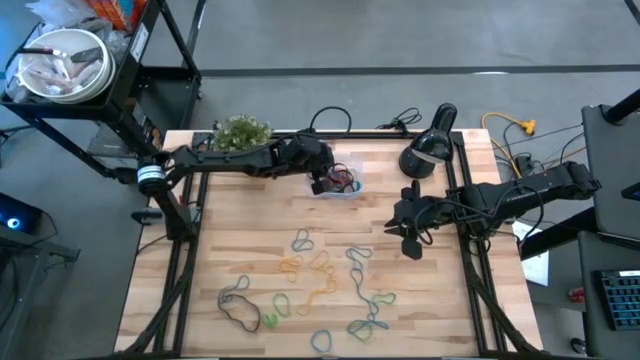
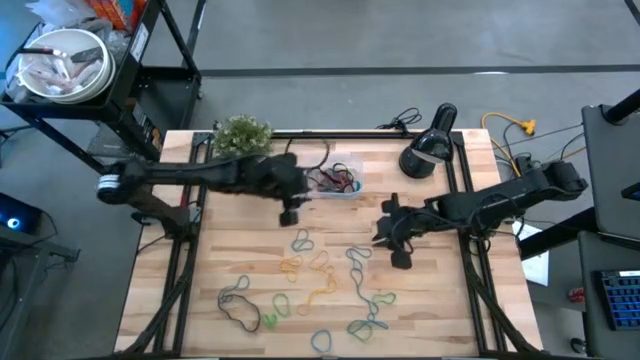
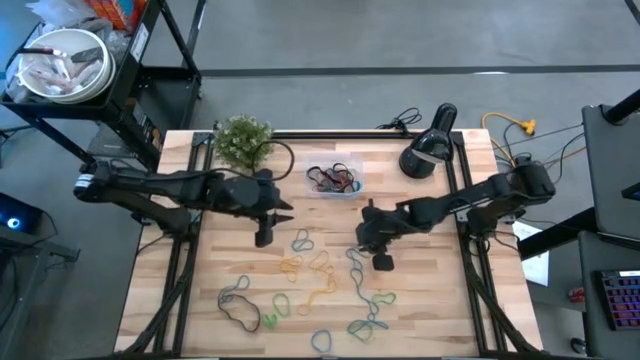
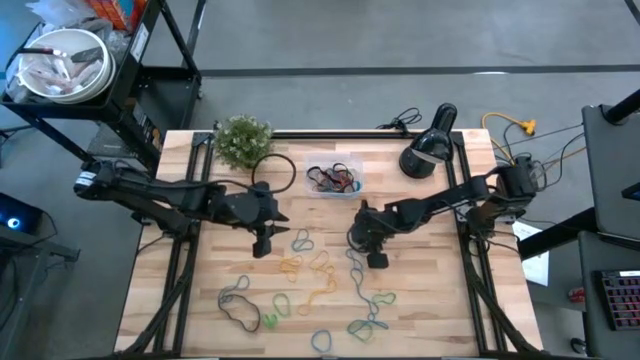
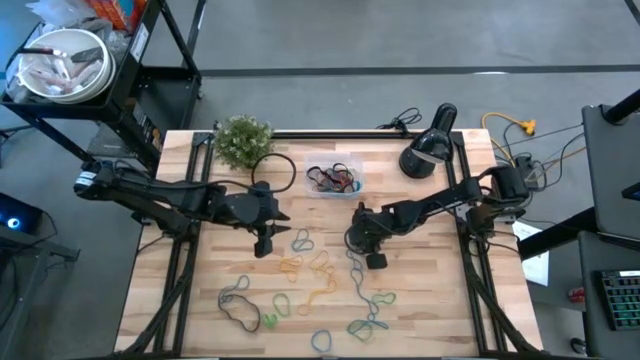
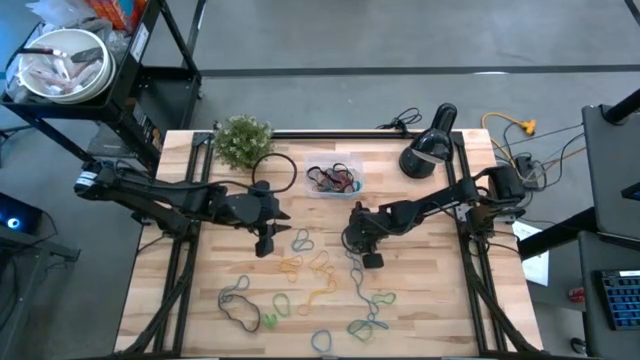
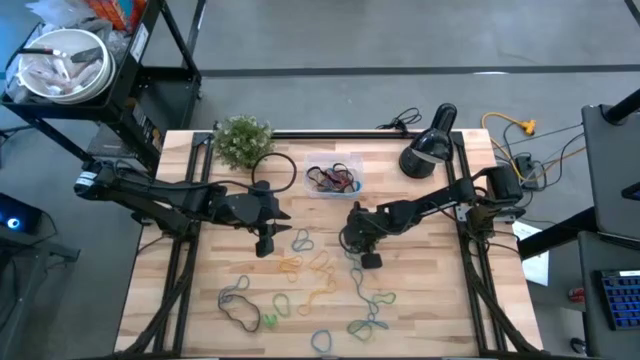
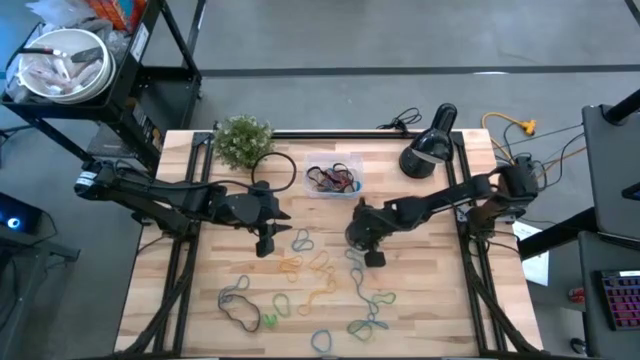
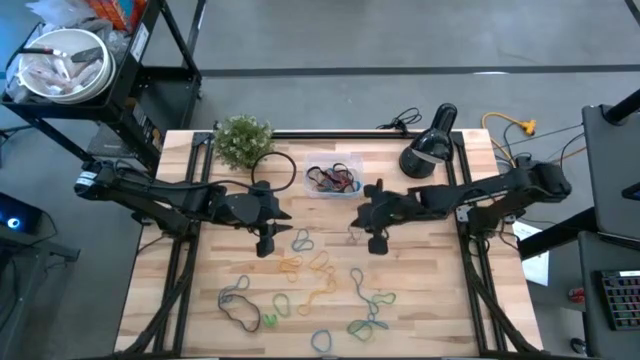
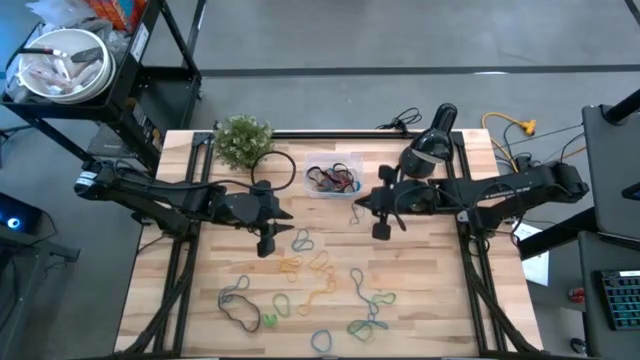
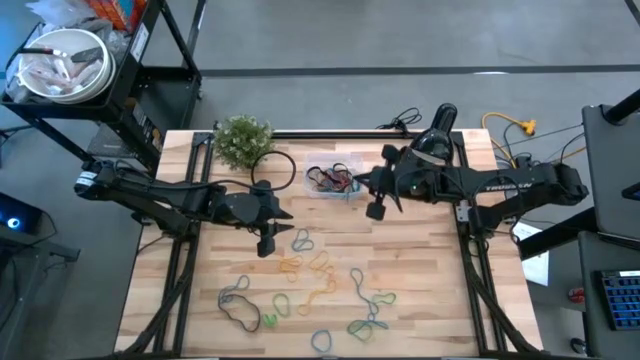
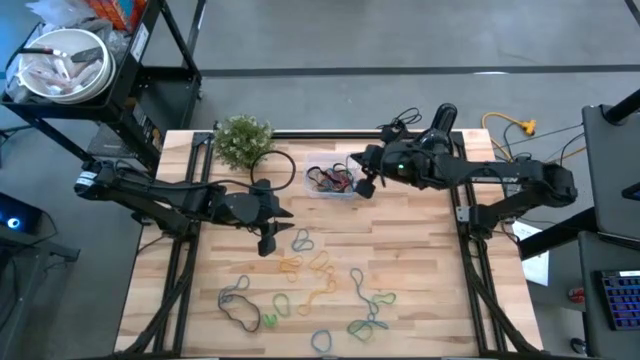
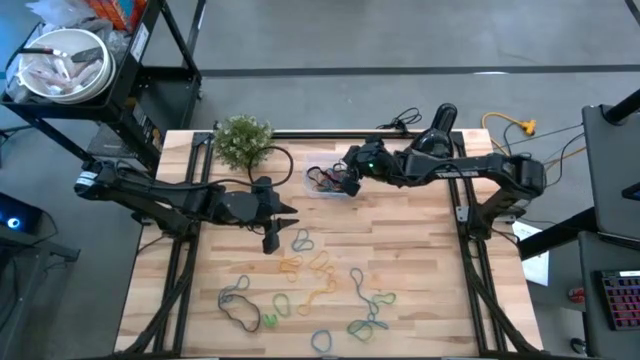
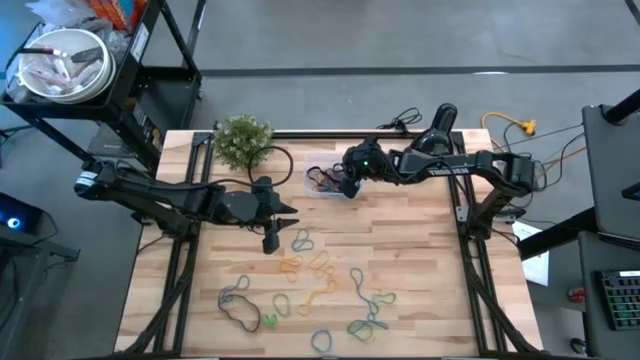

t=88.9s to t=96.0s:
Task: Pick and place rubber bands into bin
Put the blue rubberband into the transparent bin

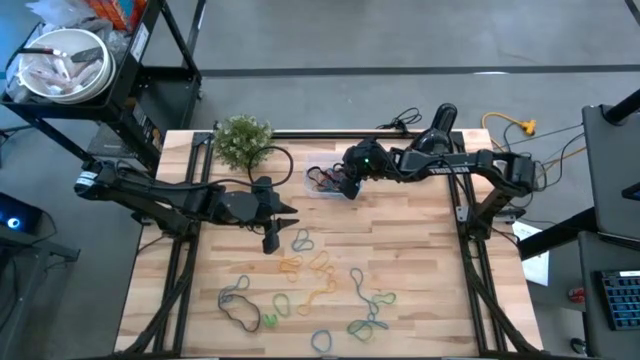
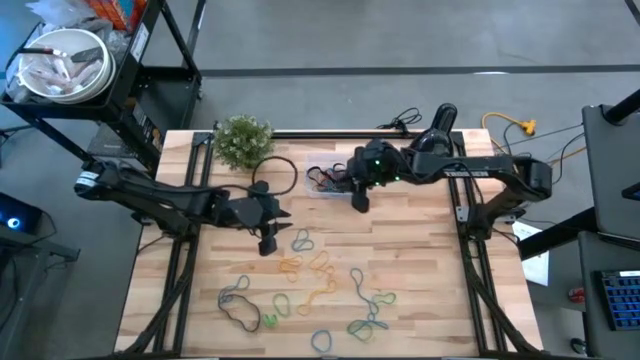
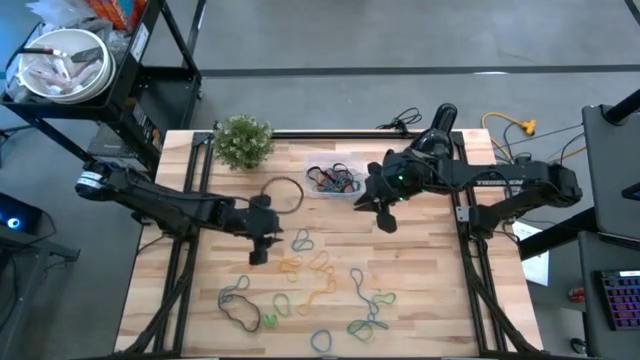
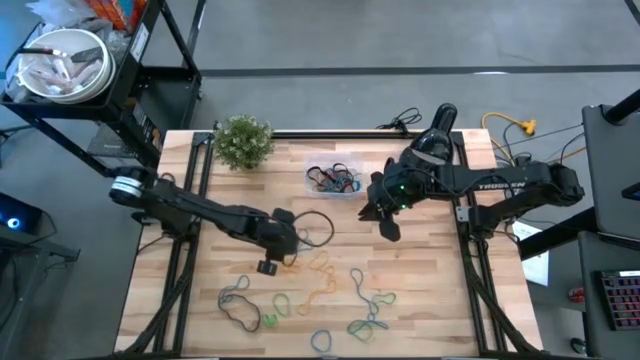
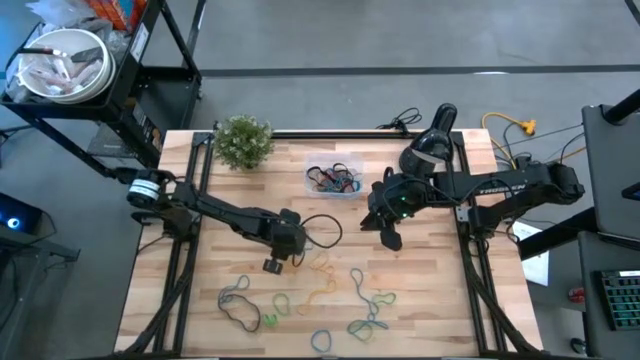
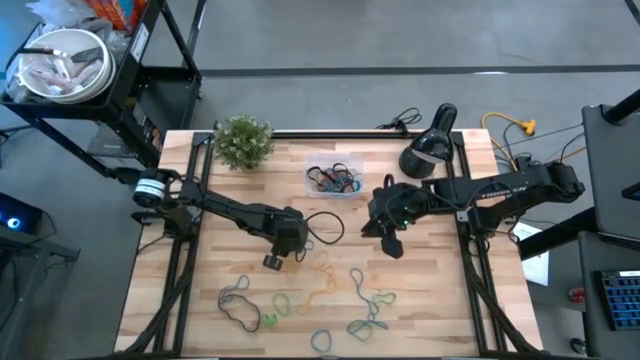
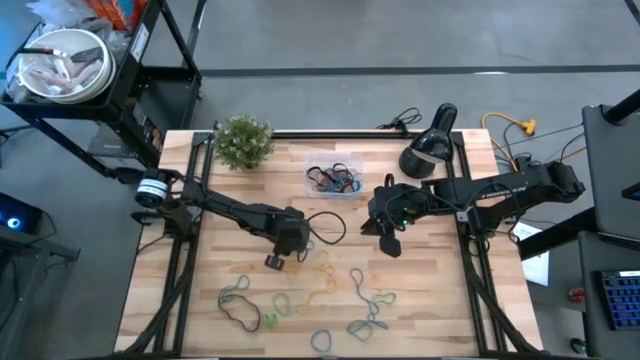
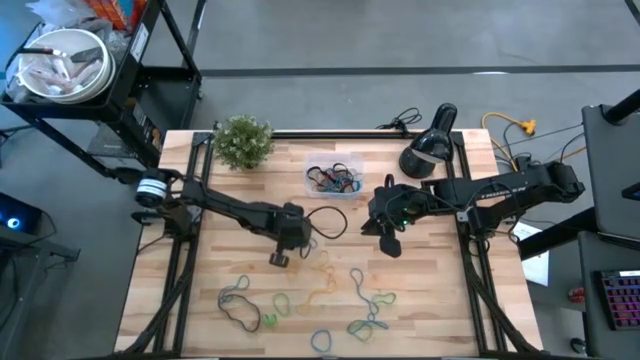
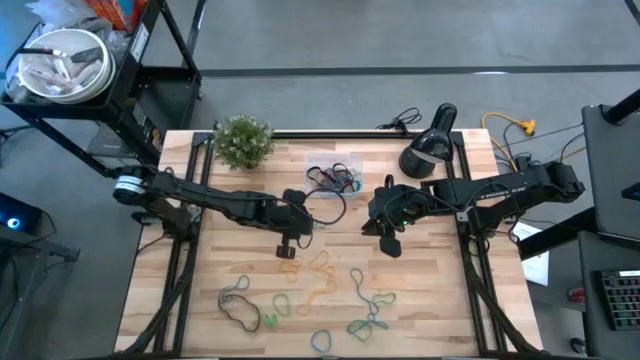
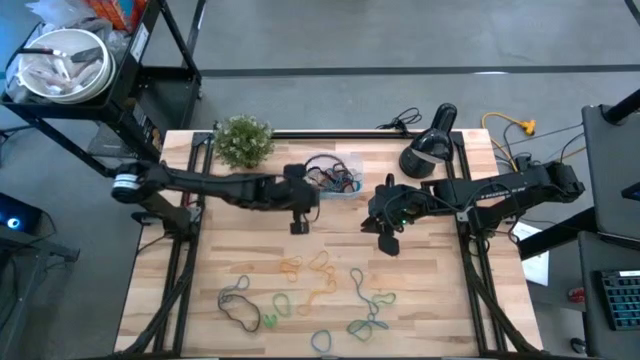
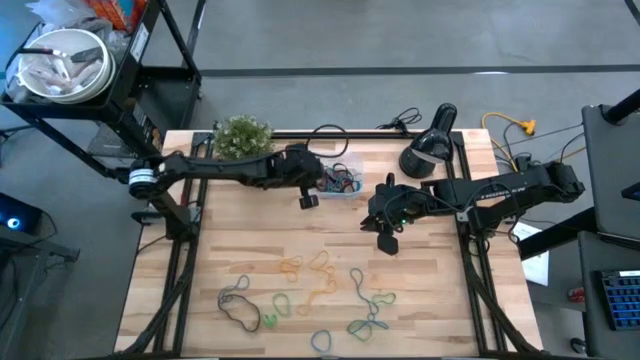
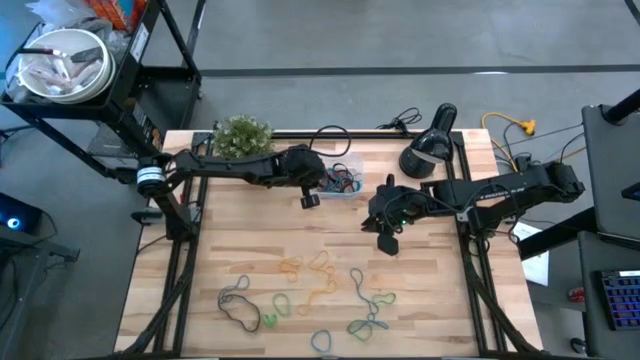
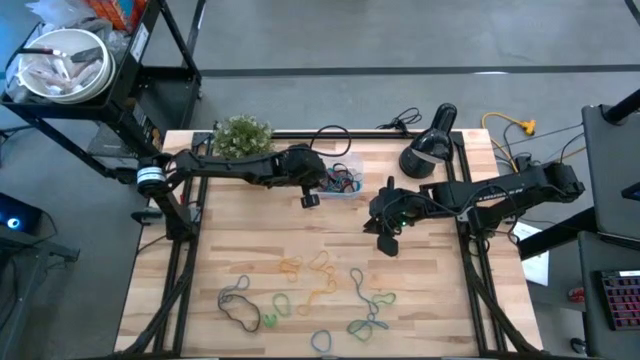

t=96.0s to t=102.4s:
Put the blue rubberband into the transparent bin

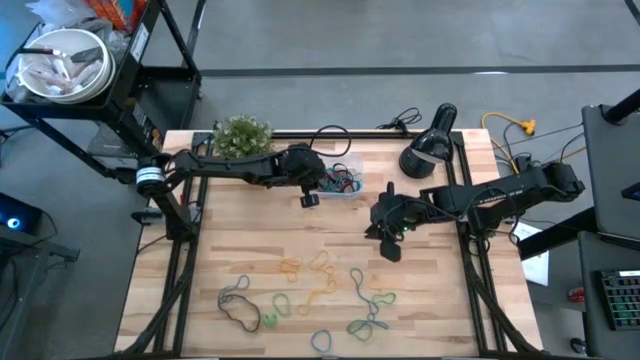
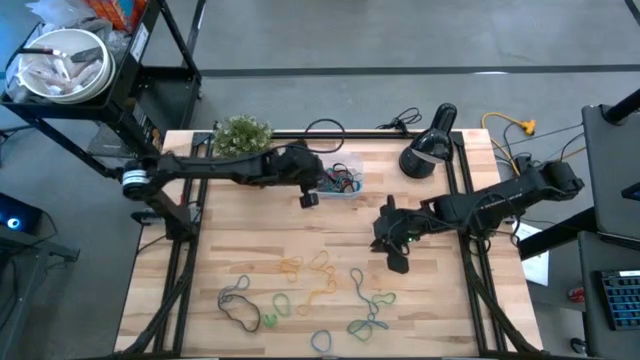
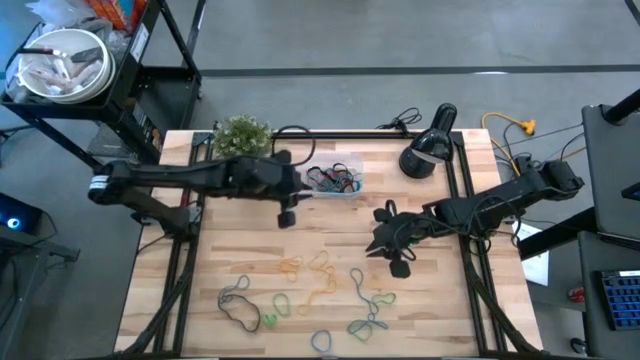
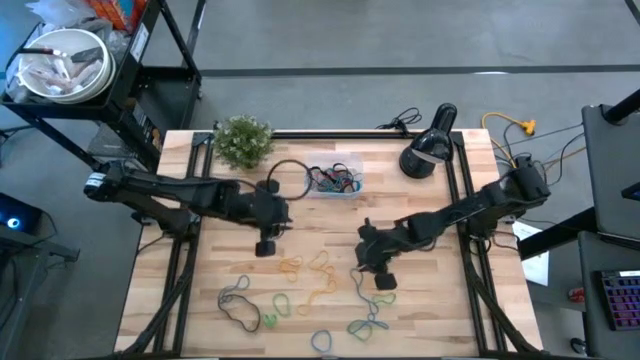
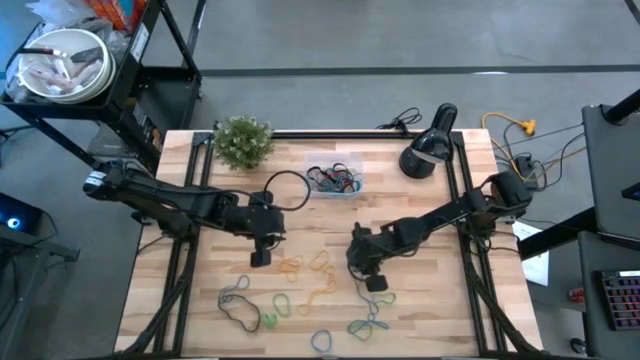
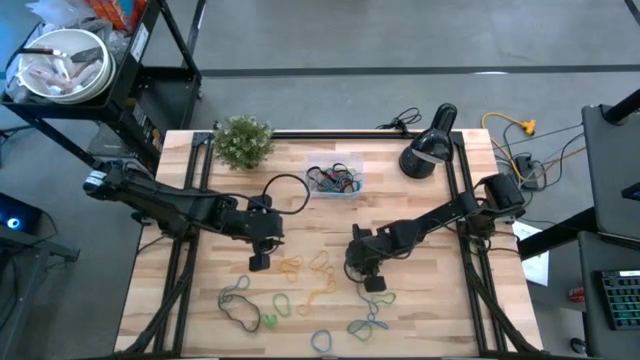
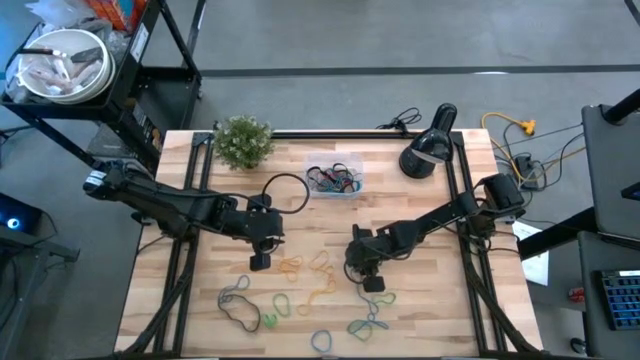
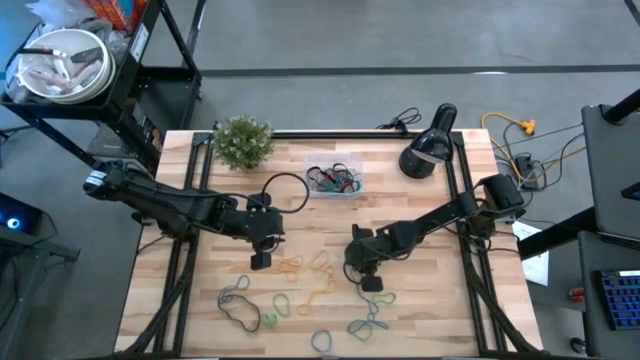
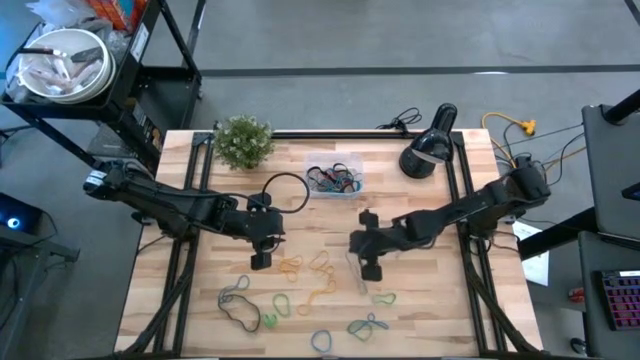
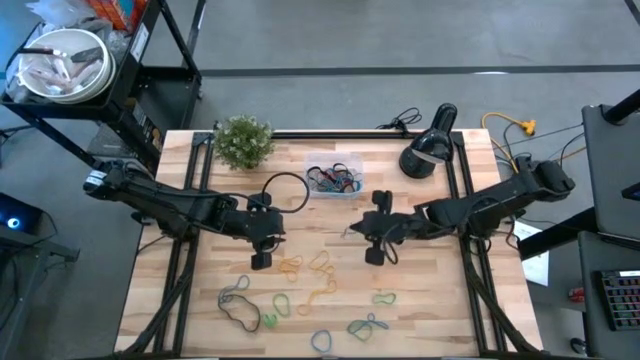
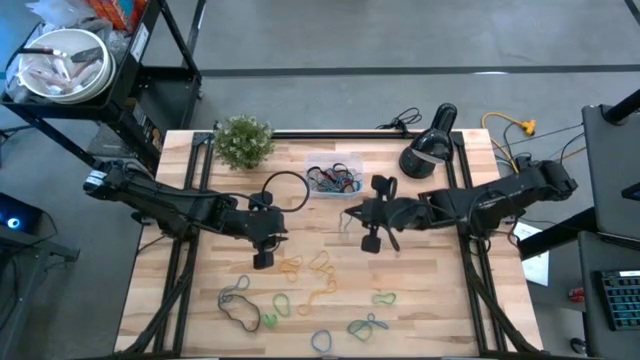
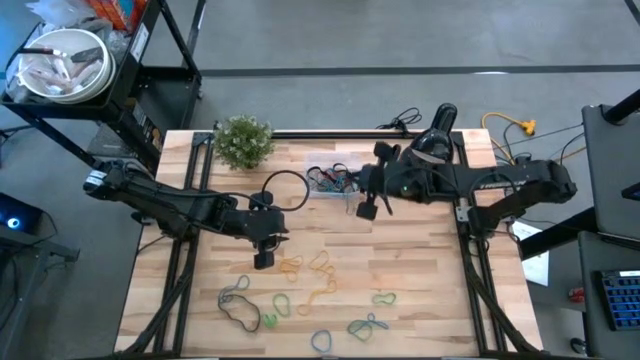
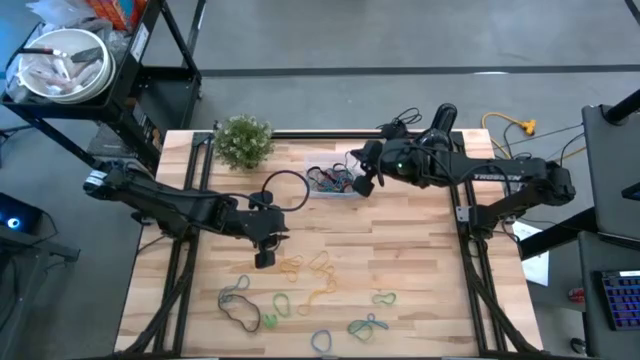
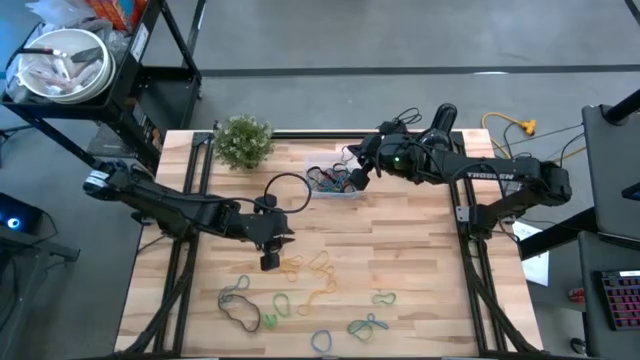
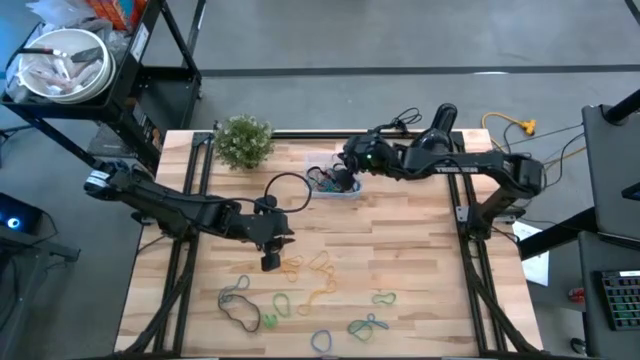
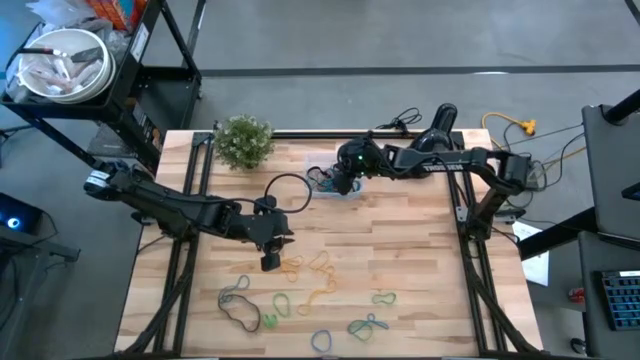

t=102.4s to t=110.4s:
Put the blue rubberband into the transparent bin

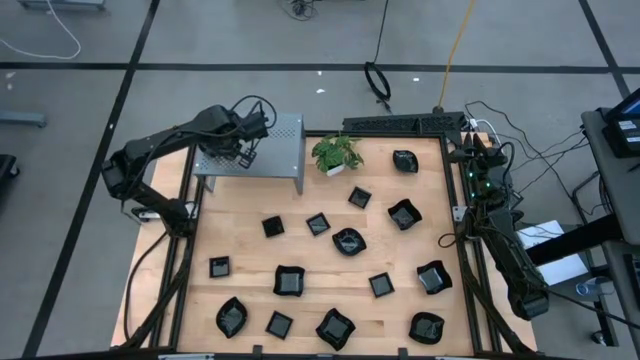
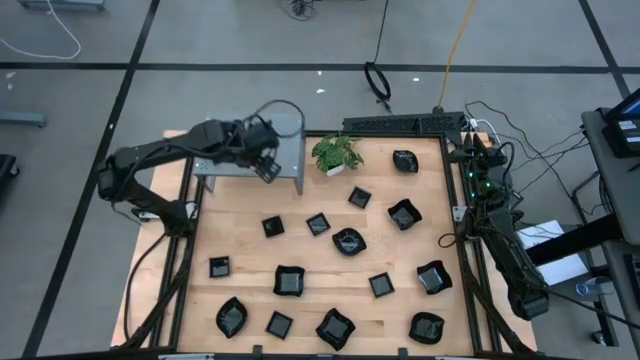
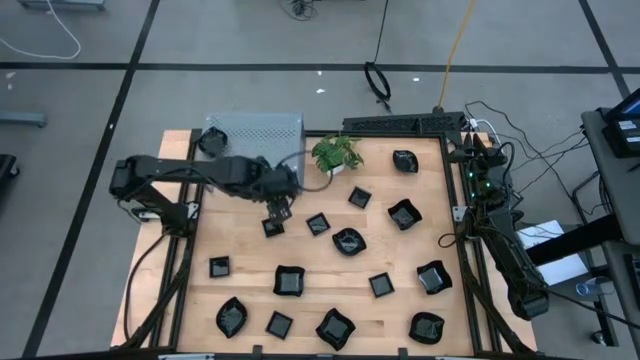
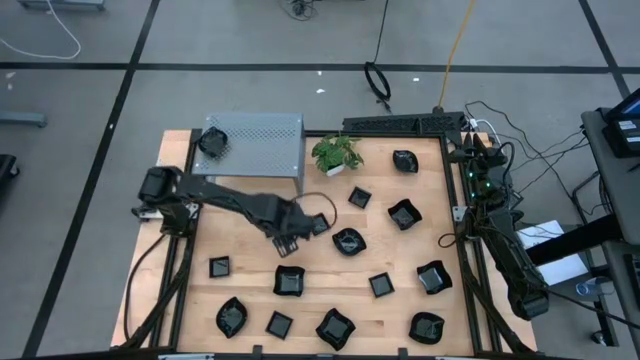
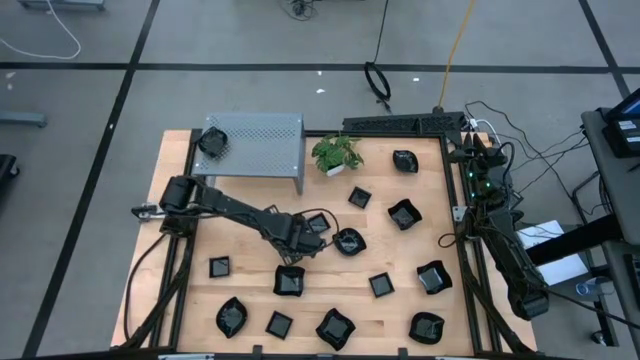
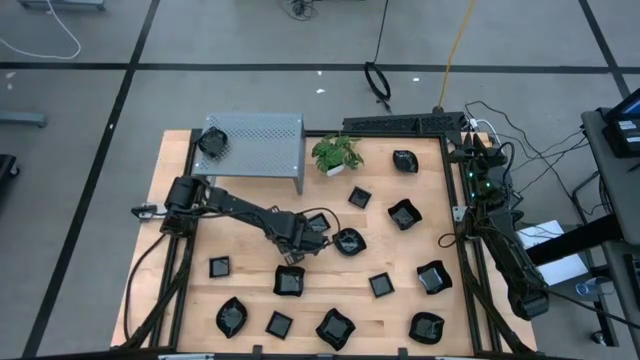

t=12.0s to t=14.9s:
Task: Pick & Place Mini shaped plates
Put the black square plate on the shelf
